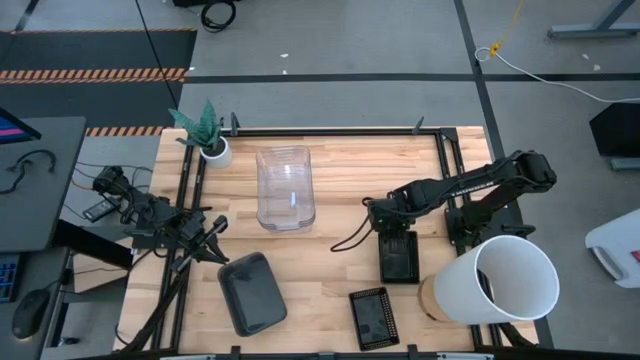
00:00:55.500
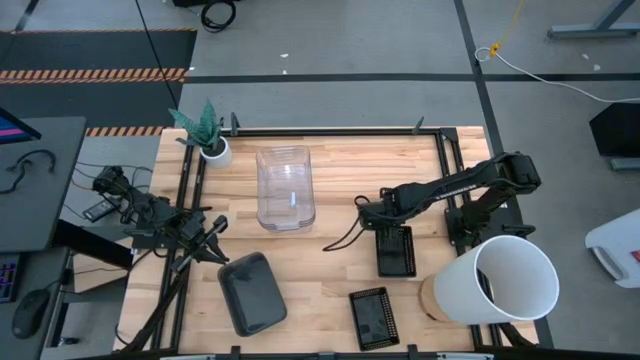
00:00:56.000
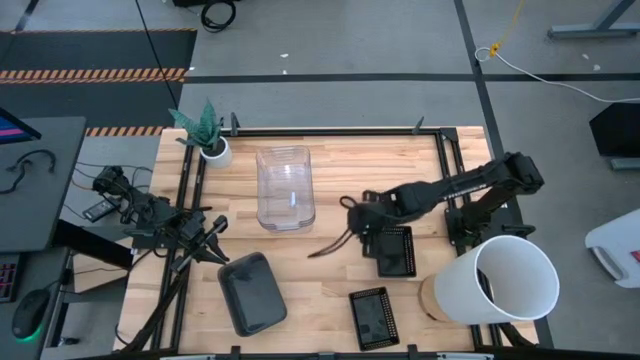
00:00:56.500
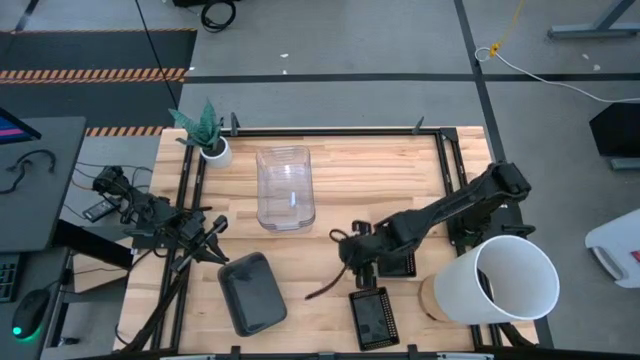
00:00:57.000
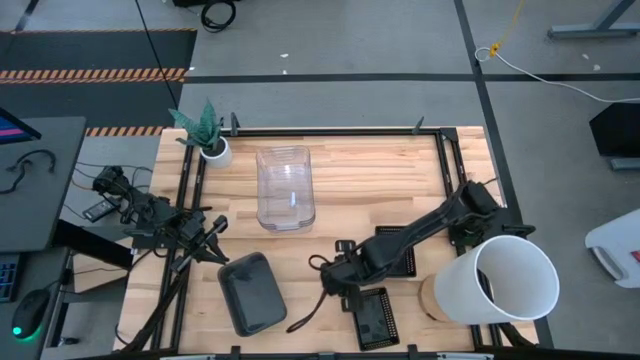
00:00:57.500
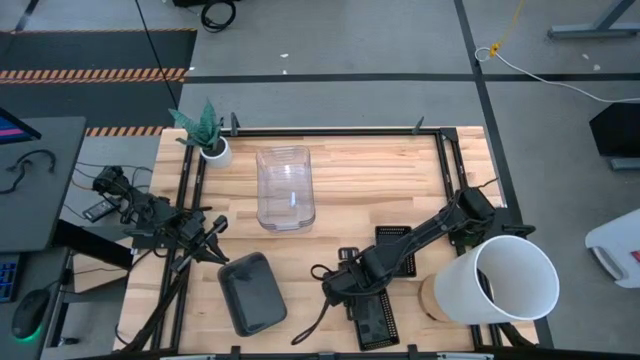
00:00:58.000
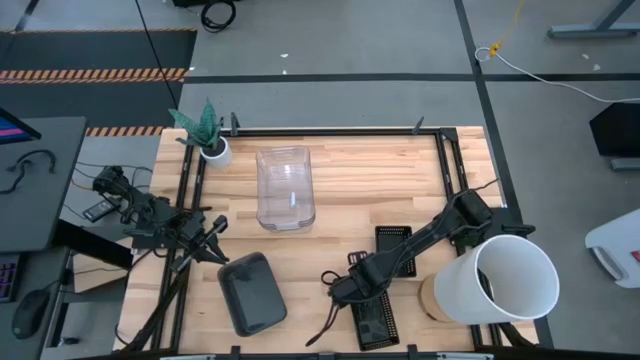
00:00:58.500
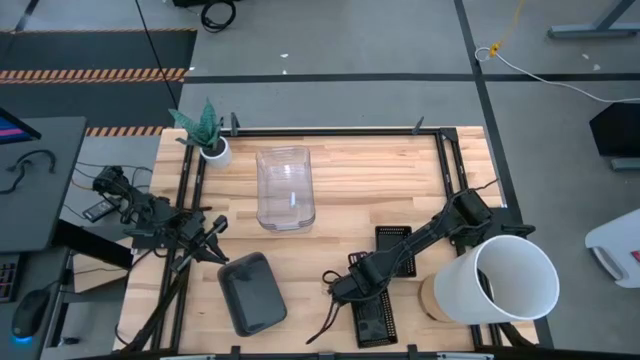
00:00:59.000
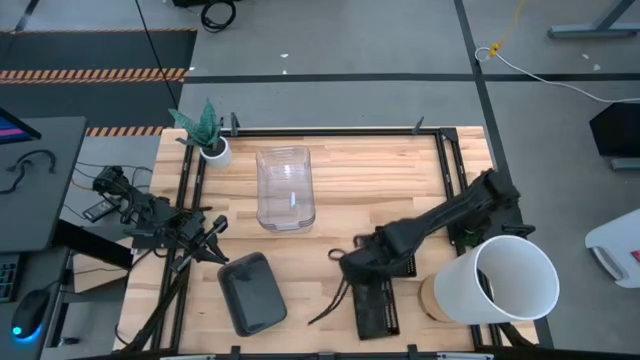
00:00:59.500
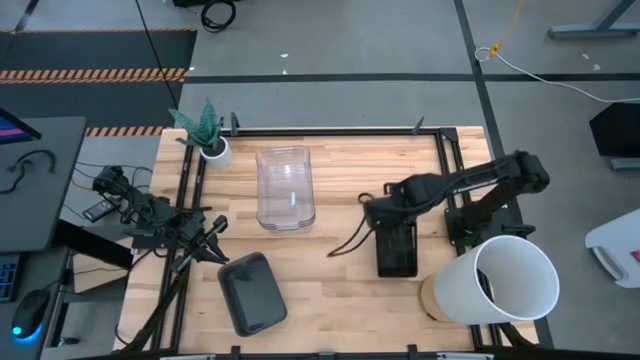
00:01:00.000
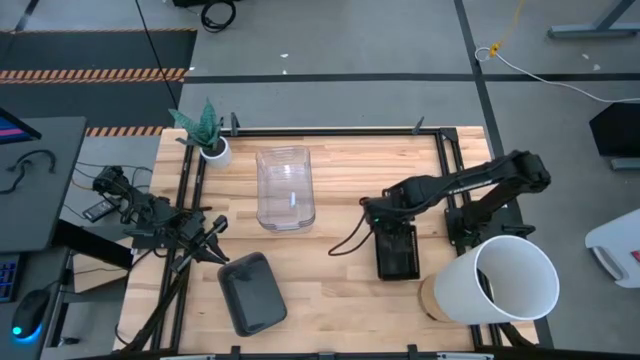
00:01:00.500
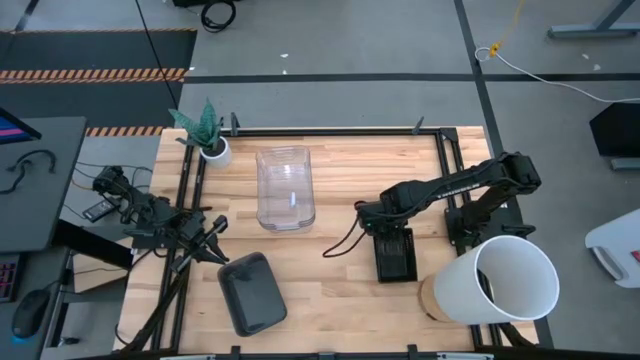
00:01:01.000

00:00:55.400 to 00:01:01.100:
Stack the bottom black bin on the top black bin

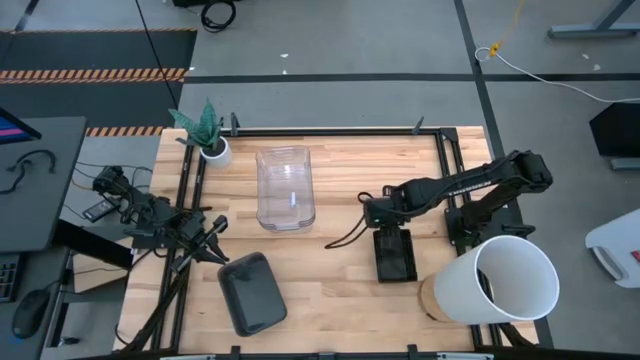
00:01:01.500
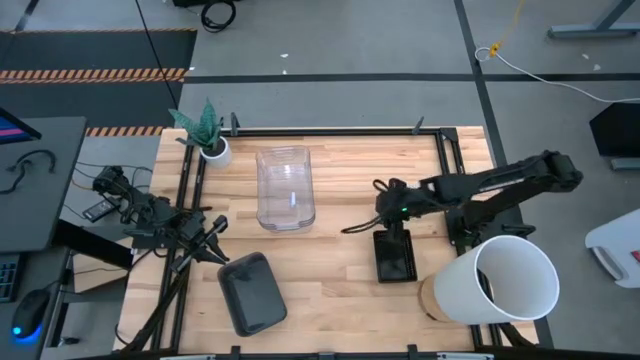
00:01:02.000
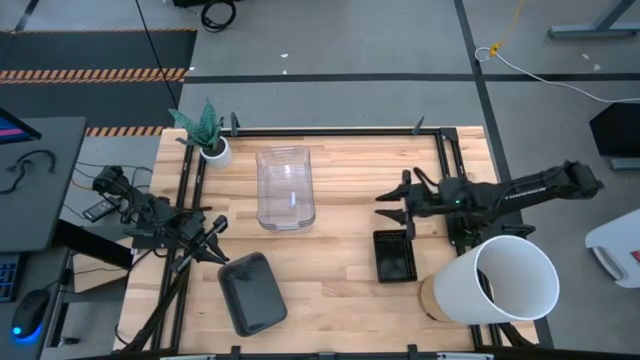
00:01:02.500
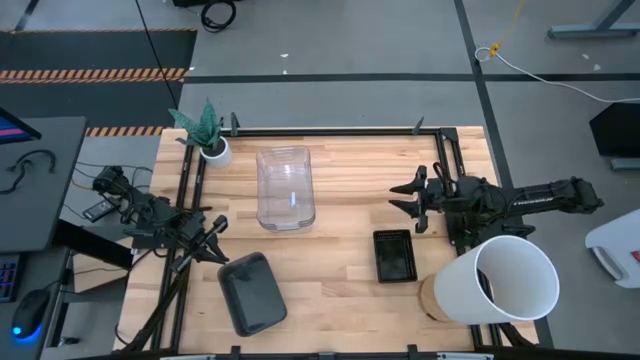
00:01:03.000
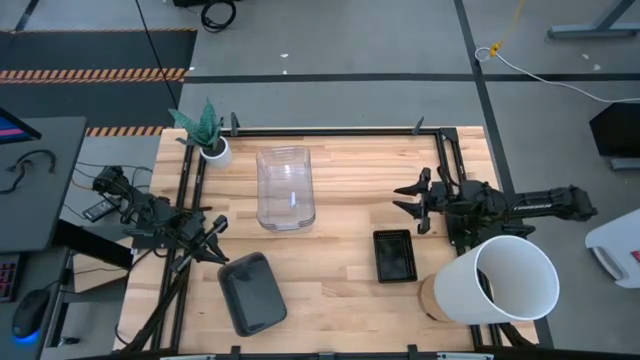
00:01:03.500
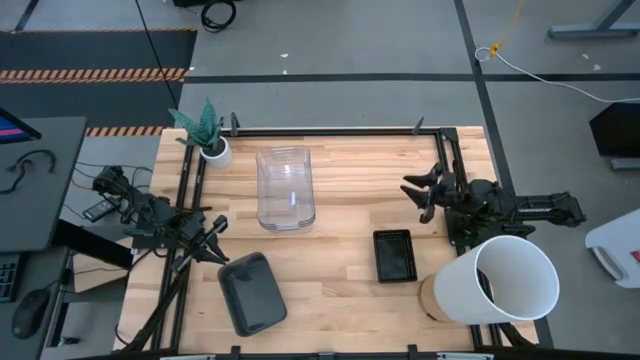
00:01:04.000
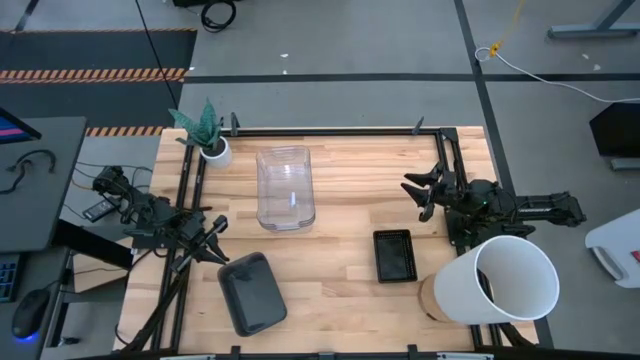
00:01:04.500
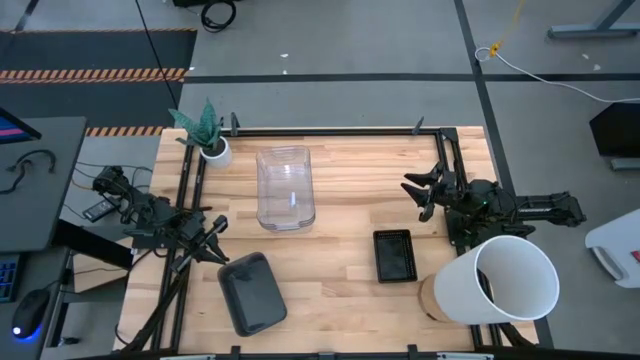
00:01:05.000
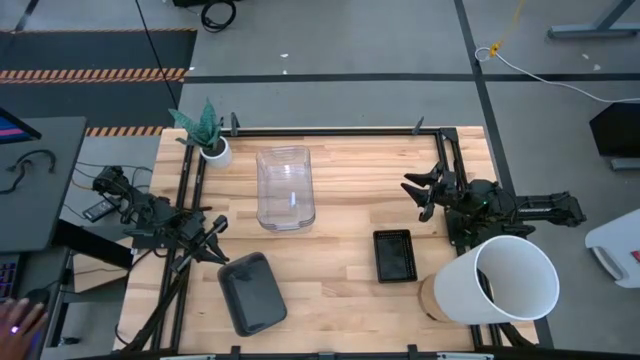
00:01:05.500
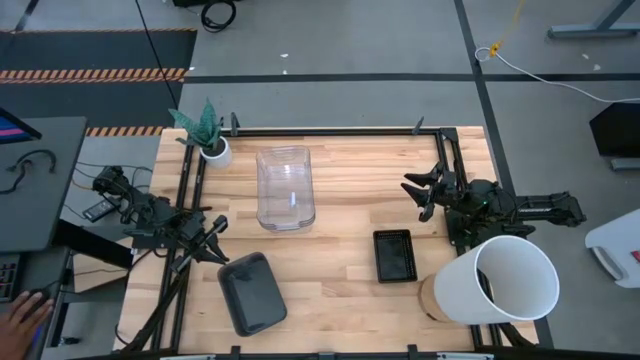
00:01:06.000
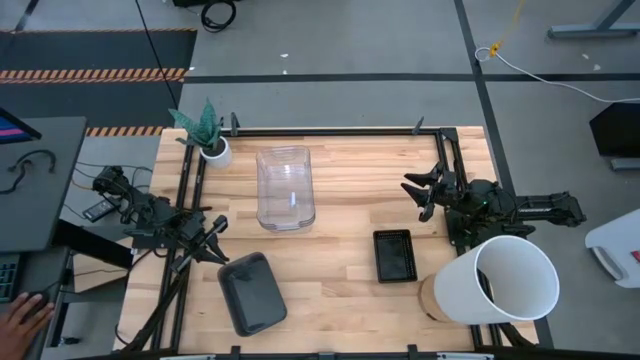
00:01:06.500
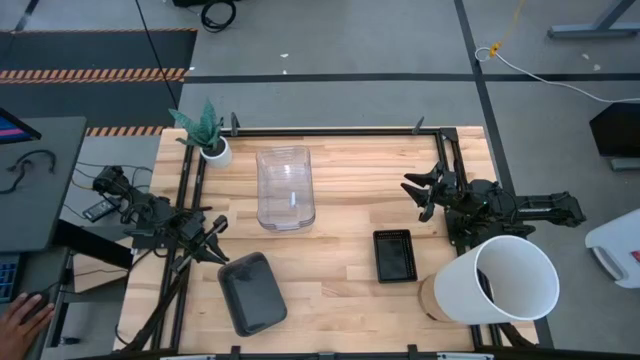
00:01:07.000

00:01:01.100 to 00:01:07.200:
Return to Home Position

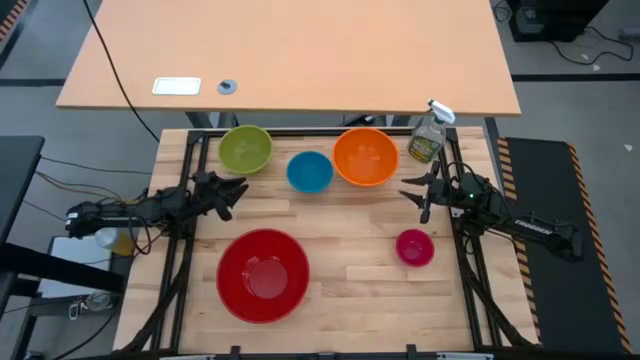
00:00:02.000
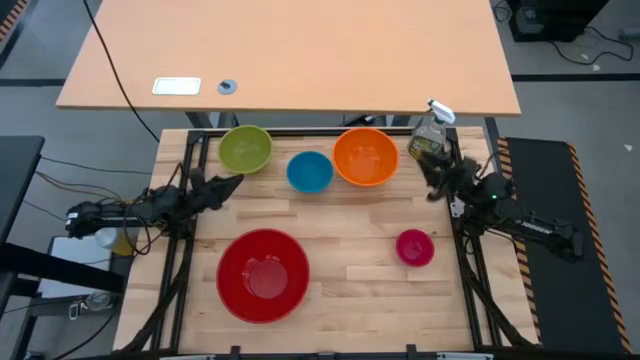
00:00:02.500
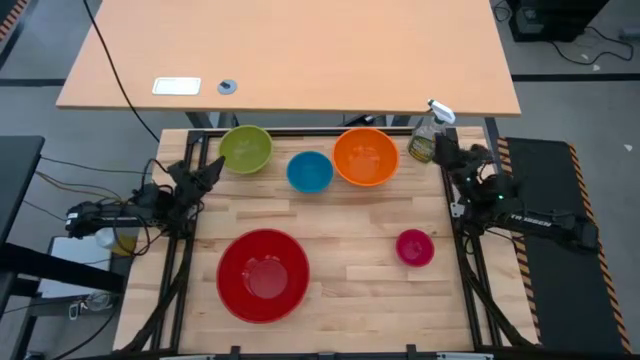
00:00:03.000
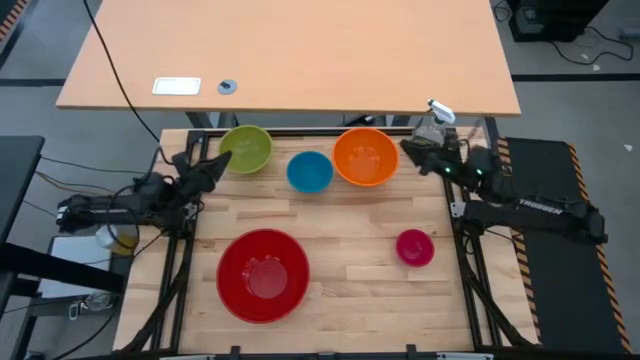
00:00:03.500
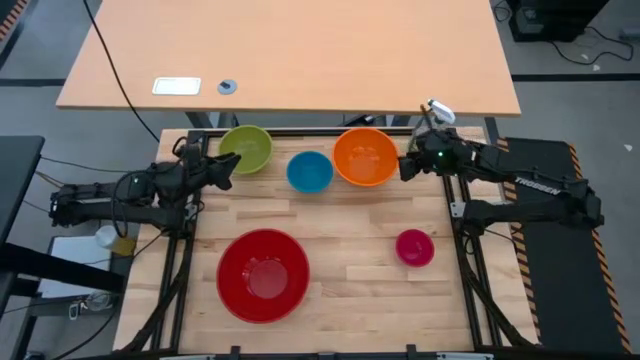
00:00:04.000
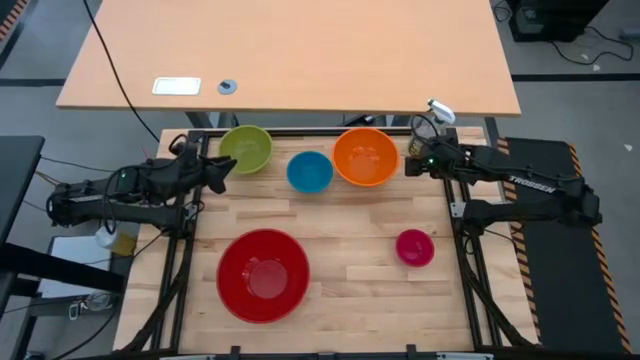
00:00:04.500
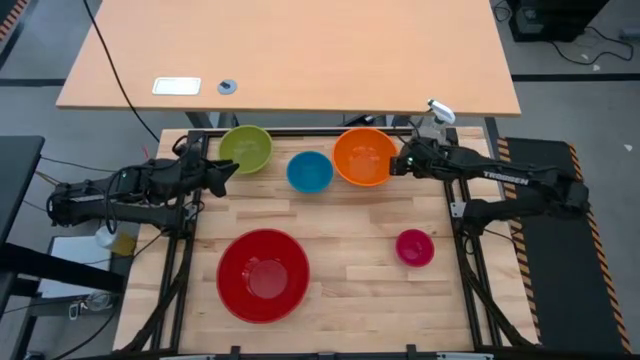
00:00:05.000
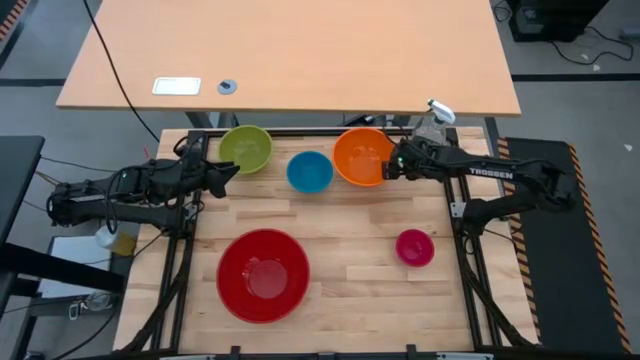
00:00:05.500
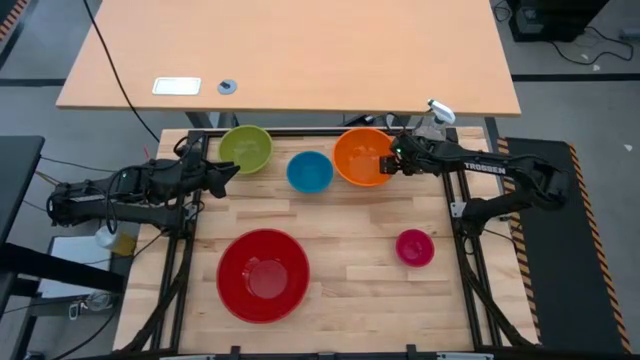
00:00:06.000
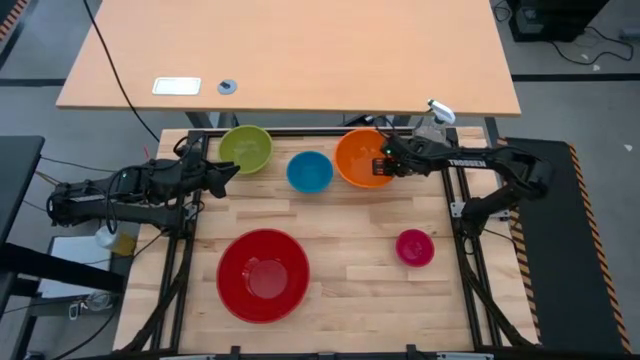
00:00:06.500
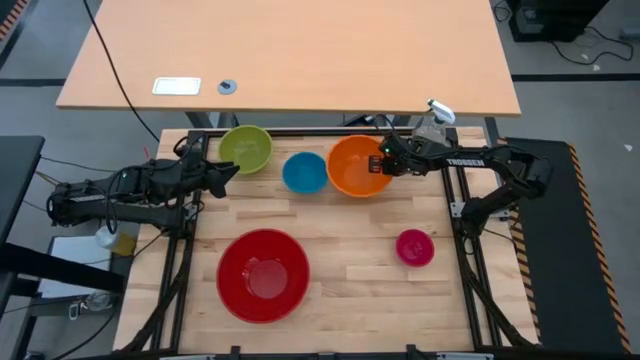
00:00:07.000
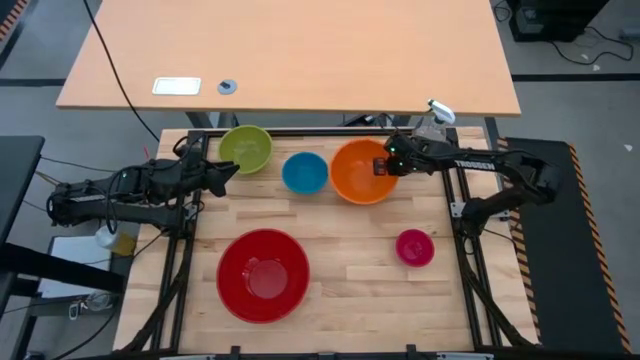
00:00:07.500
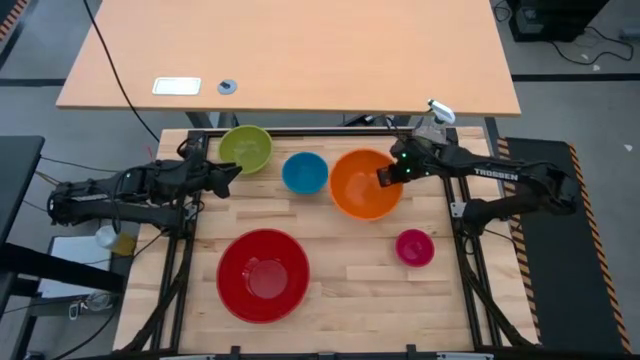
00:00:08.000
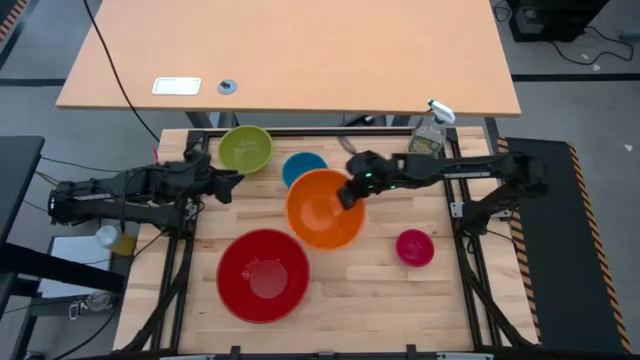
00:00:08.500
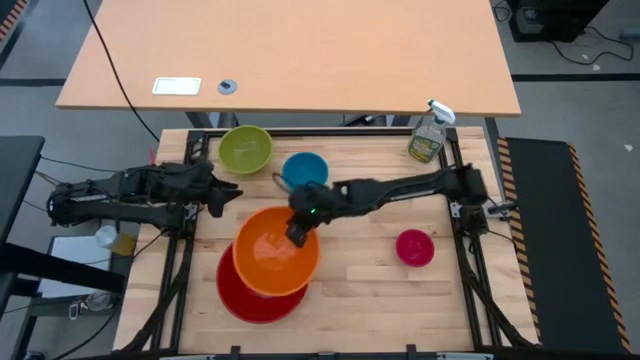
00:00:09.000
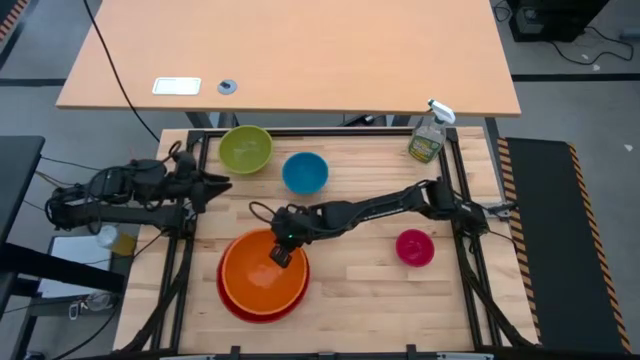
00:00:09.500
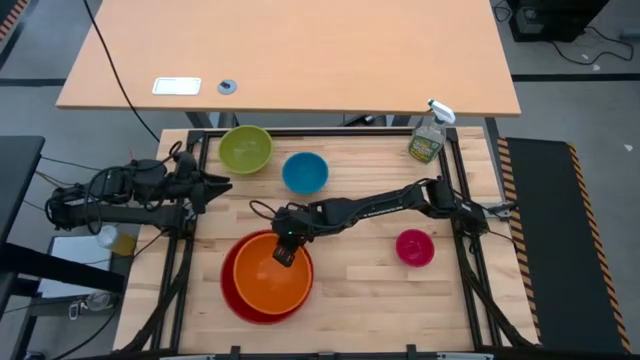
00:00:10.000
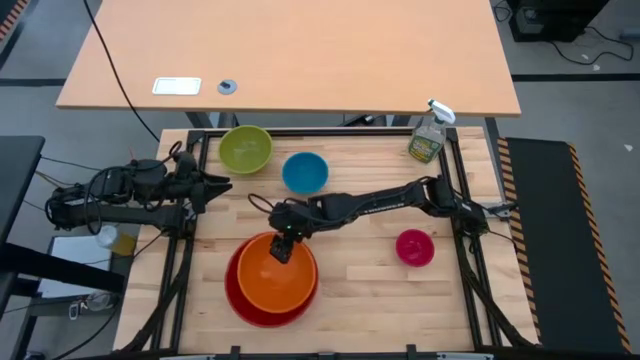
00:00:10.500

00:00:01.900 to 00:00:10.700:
Stack the orange bowl on top of the red bowl
